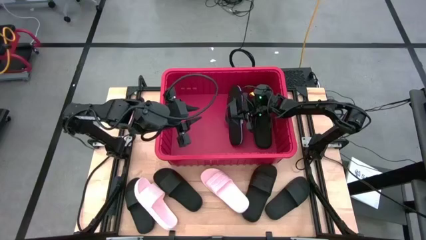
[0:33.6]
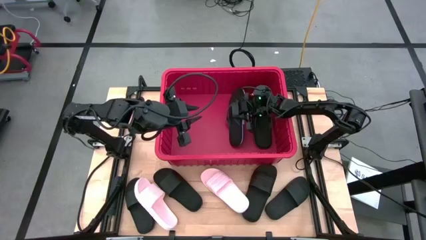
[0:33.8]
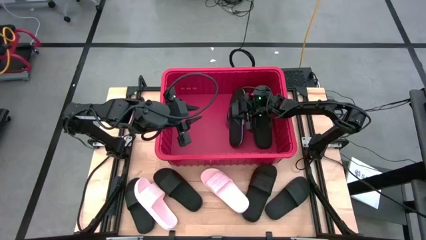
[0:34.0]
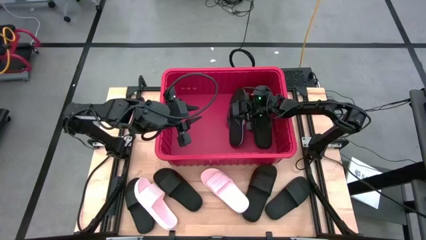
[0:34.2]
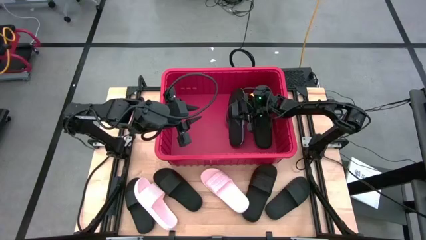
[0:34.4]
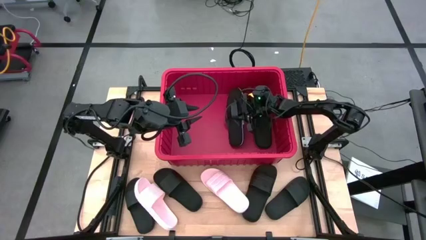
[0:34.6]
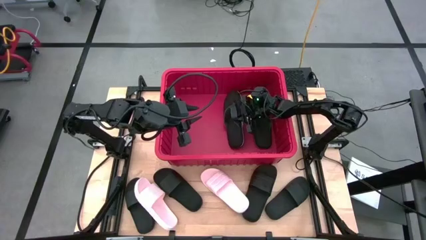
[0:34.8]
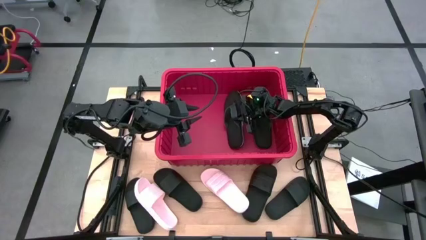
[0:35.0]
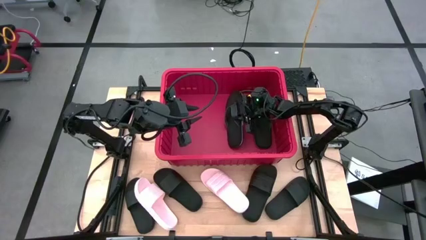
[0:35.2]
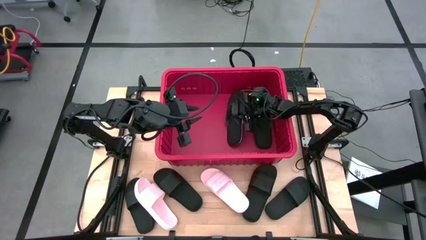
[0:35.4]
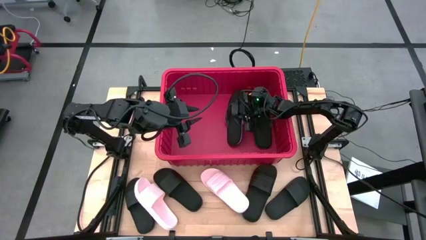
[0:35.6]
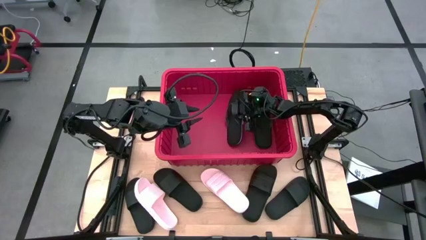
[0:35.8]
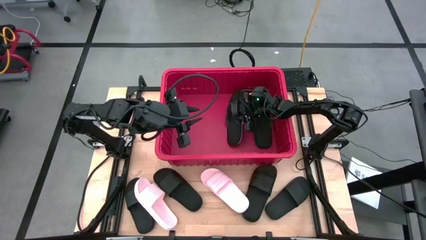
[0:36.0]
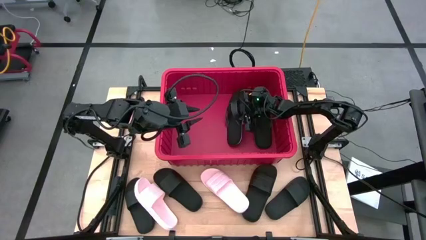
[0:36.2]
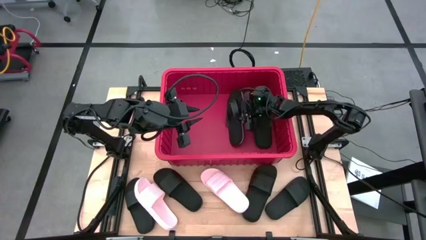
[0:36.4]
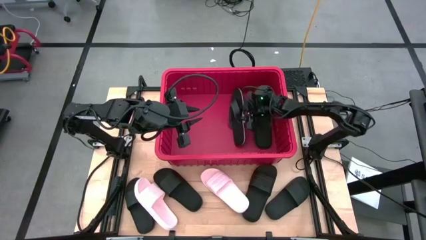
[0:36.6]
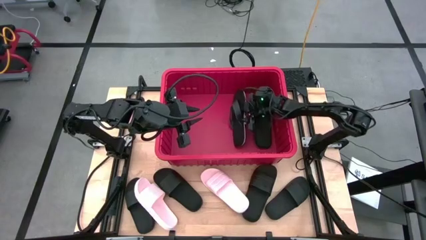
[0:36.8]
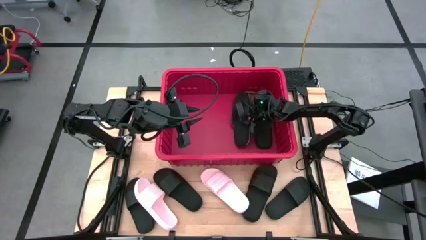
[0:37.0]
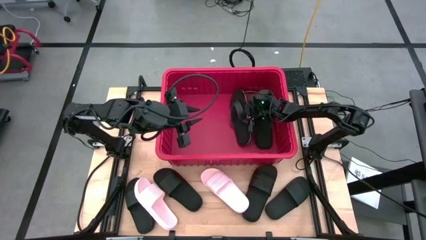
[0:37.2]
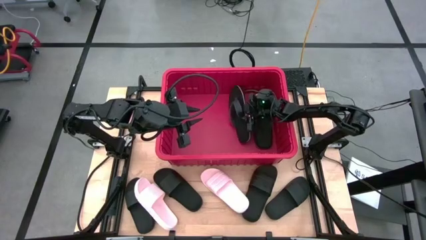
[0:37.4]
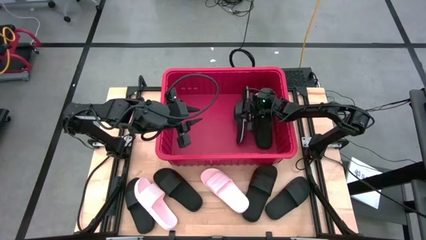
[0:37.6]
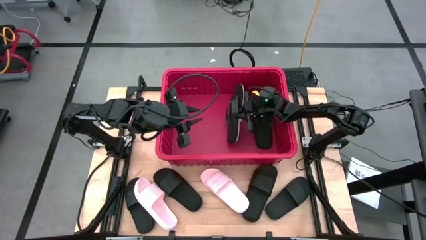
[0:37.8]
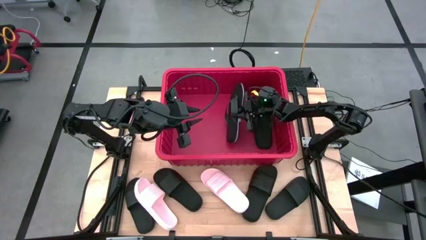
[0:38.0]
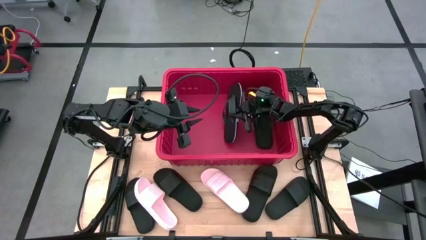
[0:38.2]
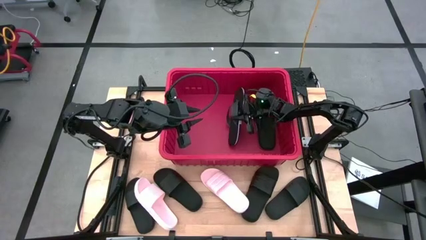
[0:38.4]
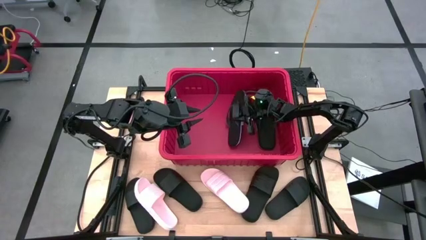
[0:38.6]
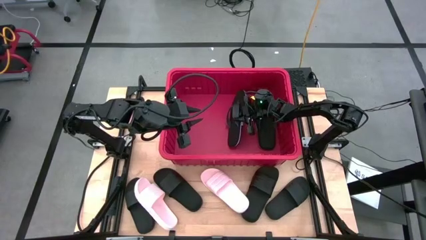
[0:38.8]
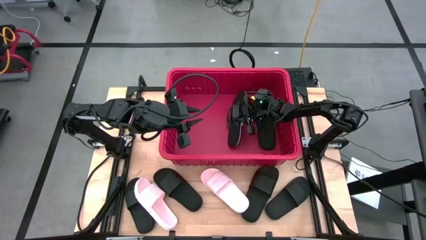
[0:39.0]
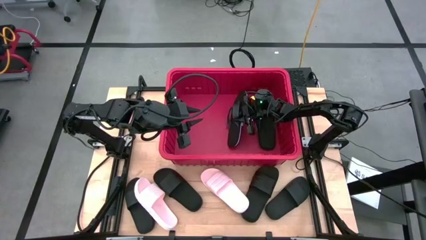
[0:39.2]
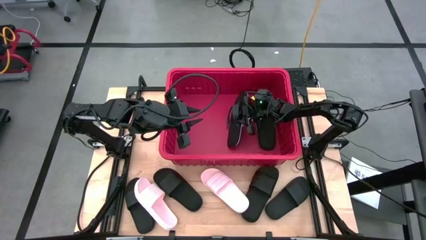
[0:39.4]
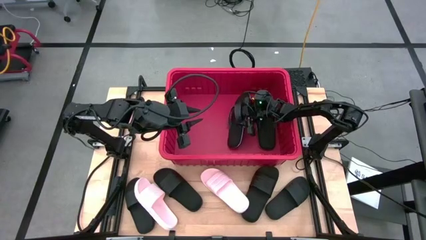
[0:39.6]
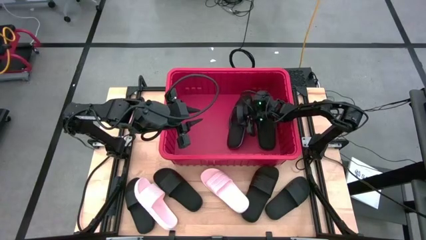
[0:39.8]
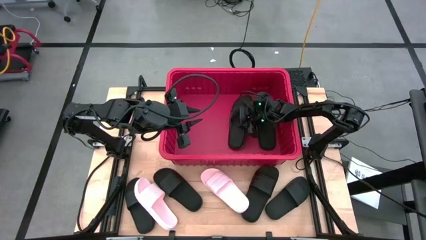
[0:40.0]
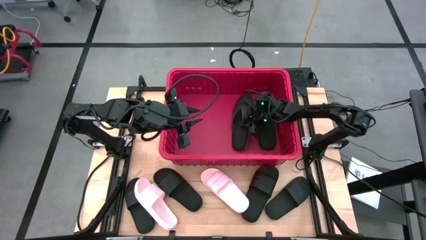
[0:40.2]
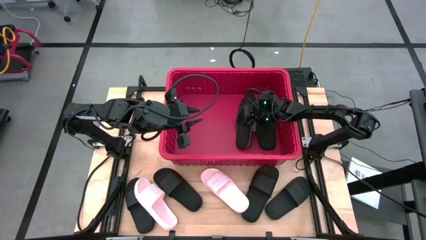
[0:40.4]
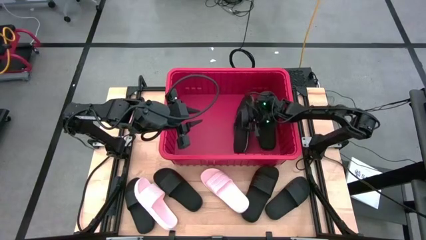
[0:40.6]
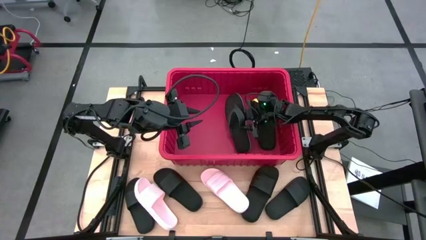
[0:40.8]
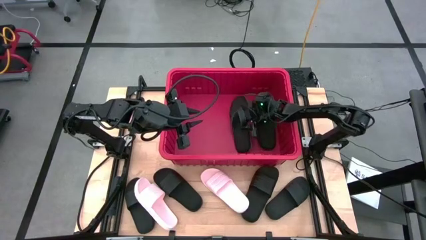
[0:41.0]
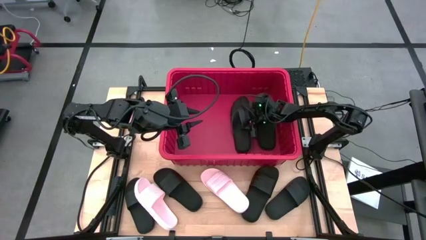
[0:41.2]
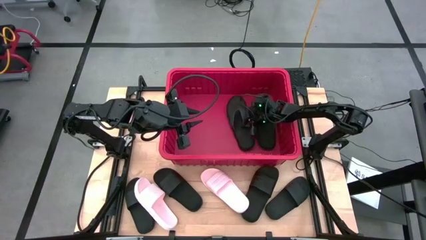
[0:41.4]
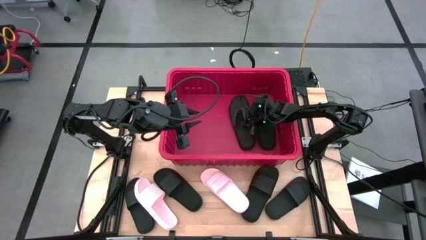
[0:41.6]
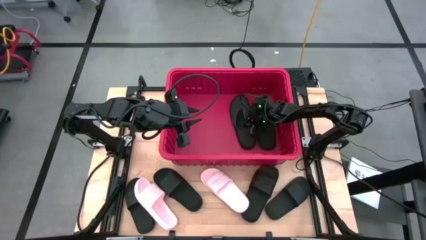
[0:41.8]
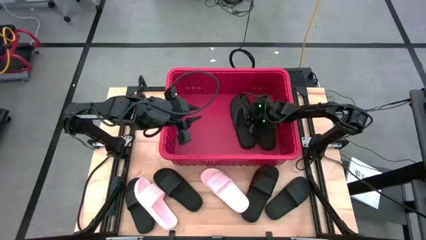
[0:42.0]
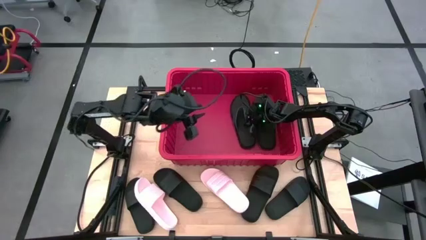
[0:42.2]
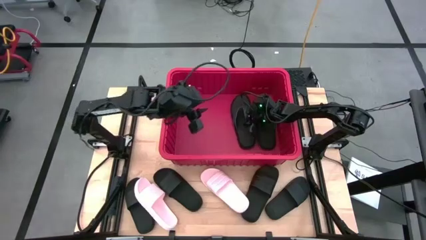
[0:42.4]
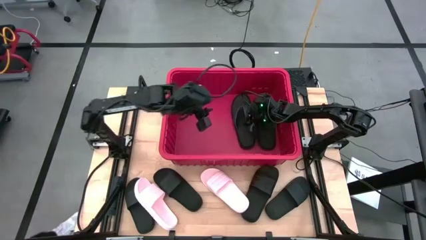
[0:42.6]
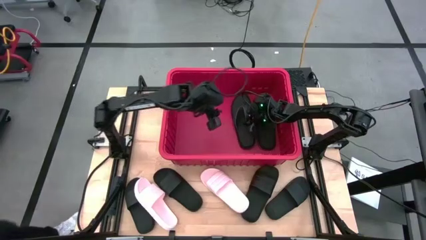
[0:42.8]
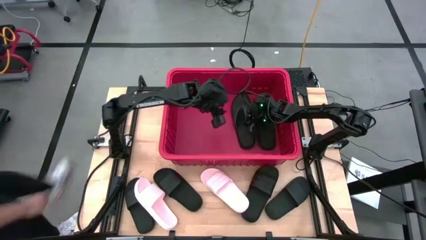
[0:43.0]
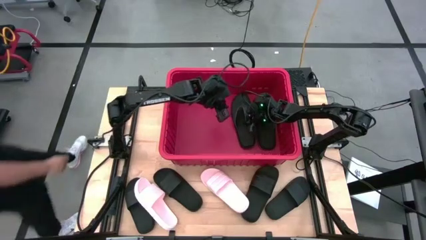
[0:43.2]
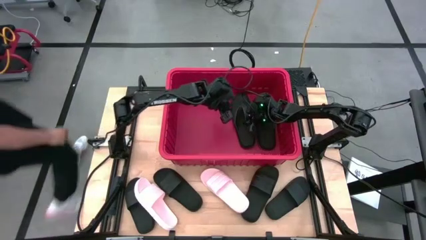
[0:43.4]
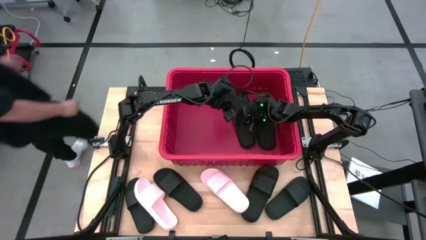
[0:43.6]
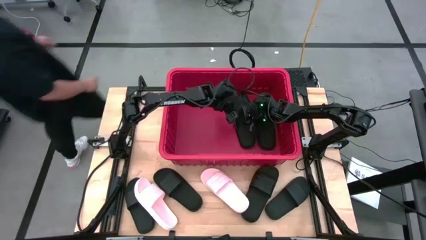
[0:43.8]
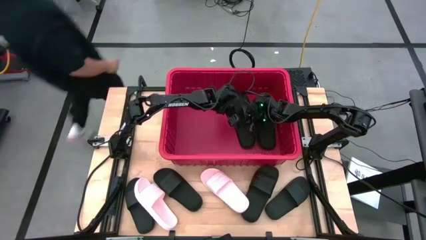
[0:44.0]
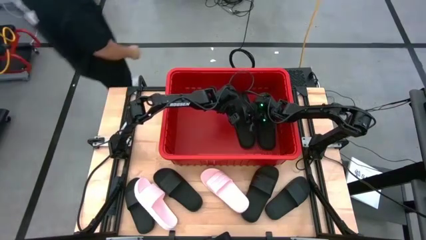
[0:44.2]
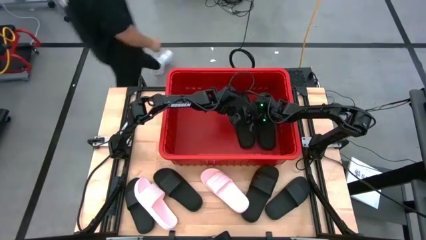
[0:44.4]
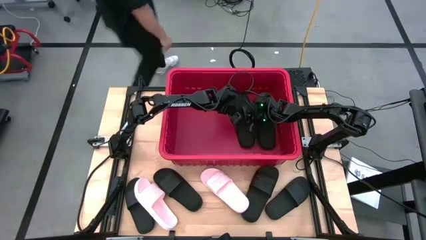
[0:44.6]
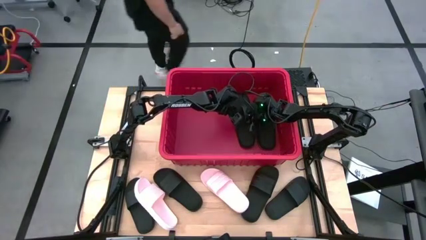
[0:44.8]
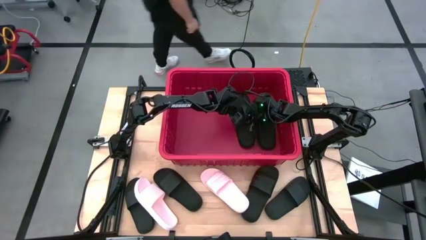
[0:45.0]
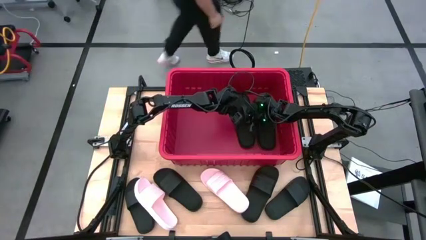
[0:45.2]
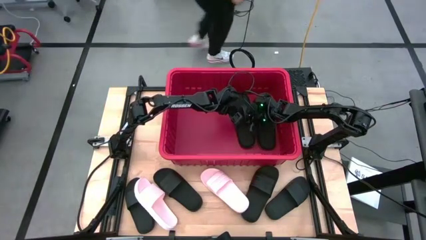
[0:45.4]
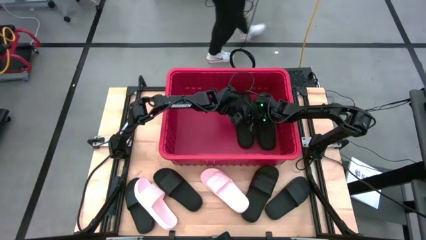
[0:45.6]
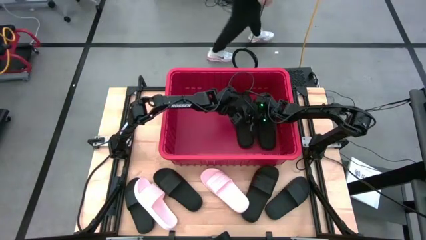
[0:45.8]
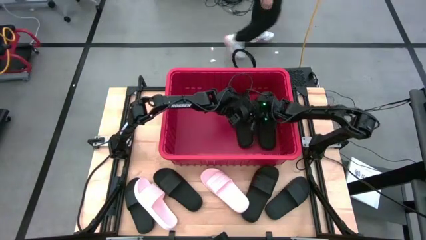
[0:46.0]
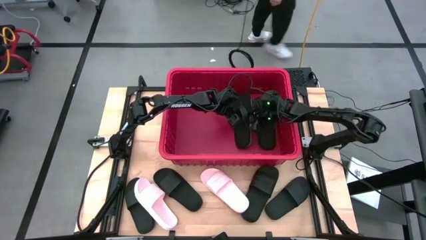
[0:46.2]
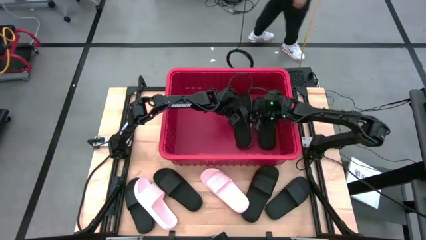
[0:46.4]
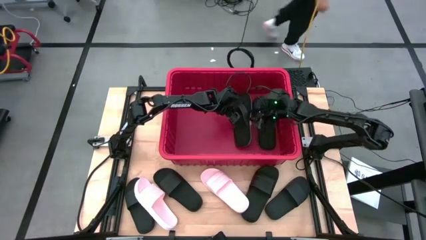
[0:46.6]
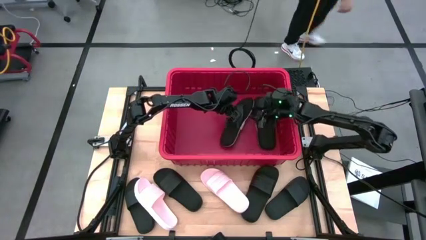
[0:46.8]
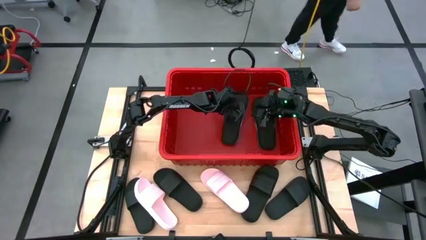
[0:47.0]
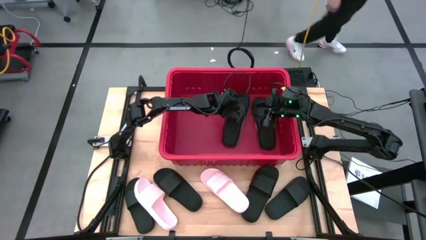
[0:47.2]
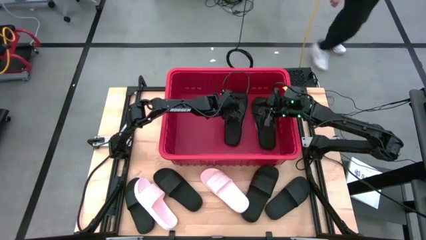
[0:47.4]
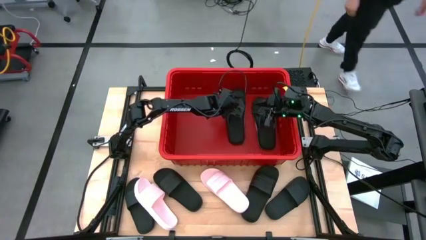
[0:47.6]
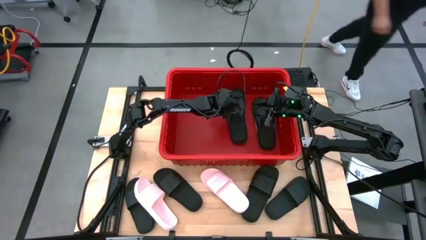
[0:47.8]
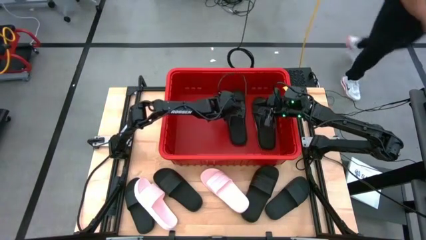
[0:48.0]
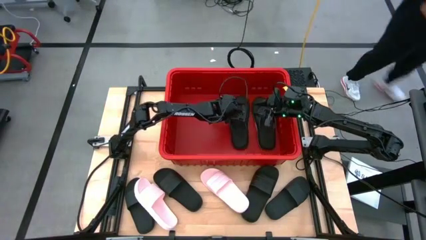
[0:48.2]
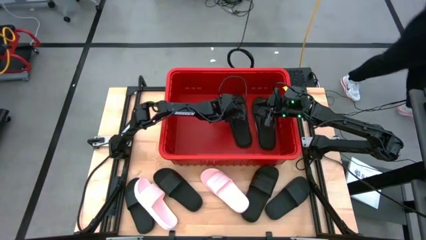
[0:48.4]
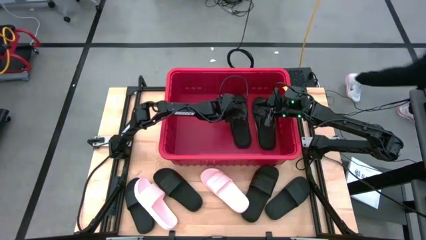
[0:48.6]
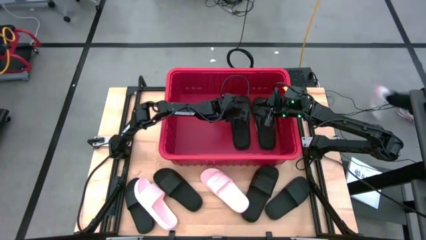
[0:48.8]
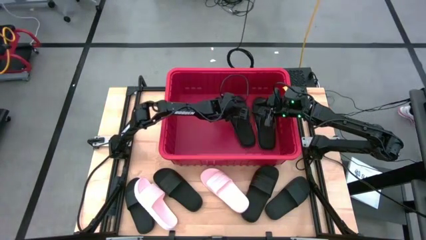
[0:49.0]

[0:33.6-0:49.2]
Task: Pick and place slides into bin
Put the black slipper into the red bin

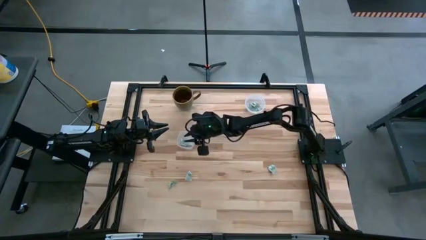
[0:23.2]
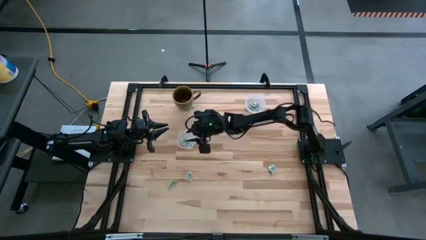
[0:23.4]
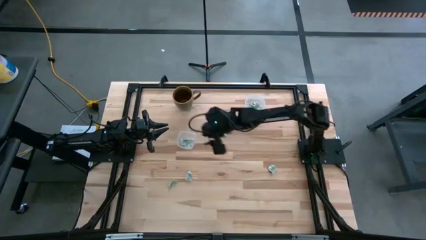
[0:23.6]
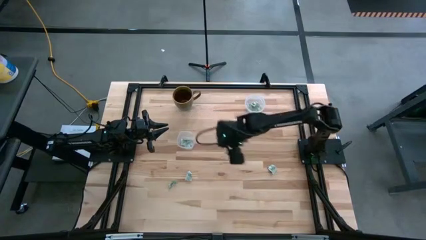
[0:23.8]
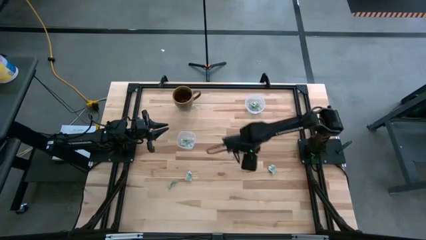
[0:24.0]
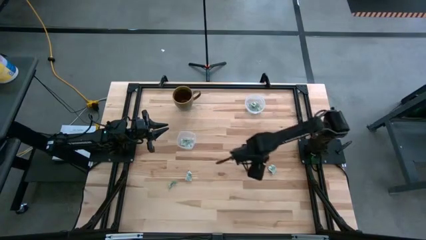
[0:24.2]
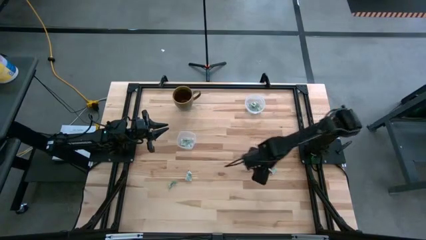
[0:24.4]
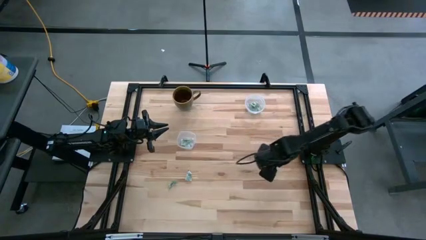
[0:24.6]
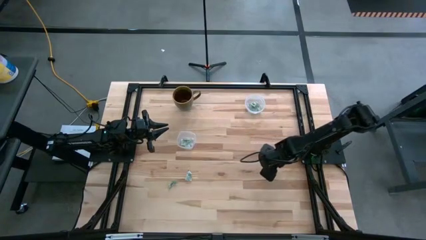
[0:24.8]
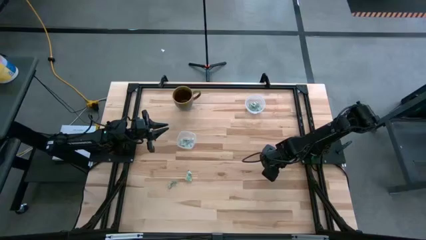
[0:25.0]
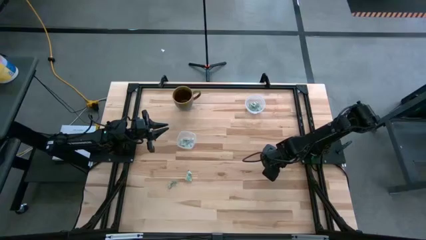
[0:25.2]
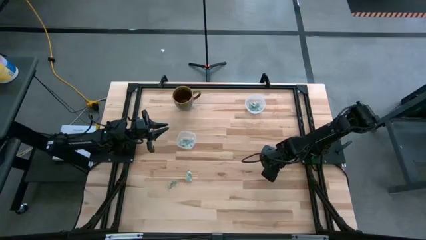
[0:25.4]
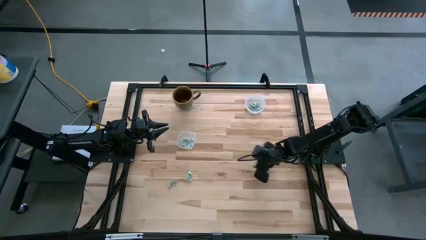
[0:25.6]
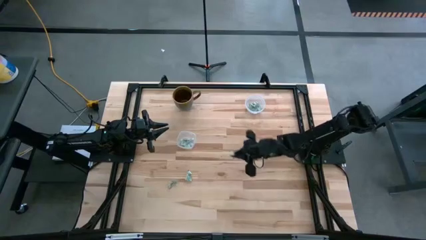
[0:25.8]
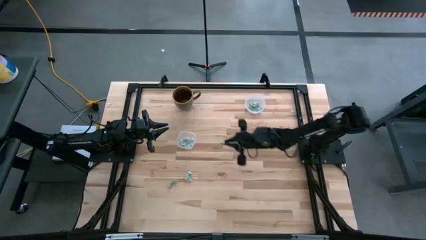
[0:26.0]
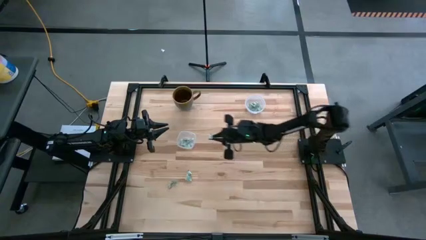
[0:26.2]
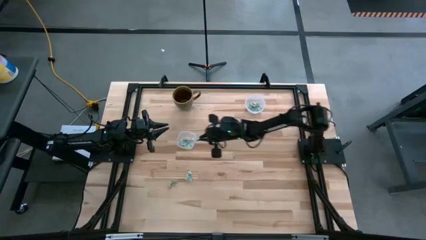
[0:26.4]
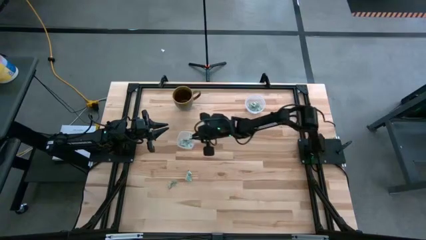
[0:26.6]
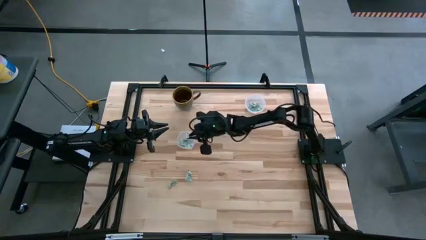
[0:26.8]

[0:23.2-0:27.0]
Task: Pick and place Stevia / Truvia into bins
Put the stevia packet into the bottom container
